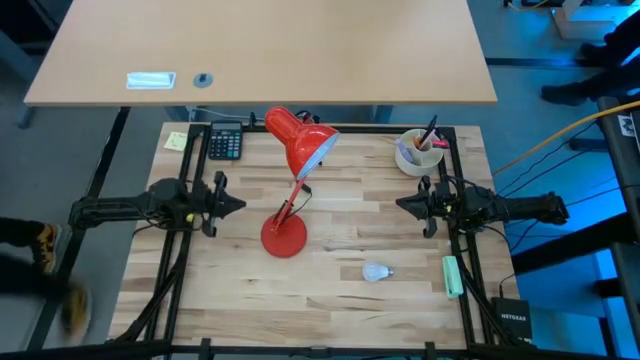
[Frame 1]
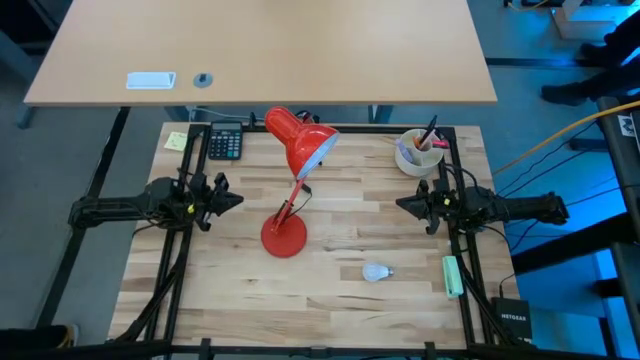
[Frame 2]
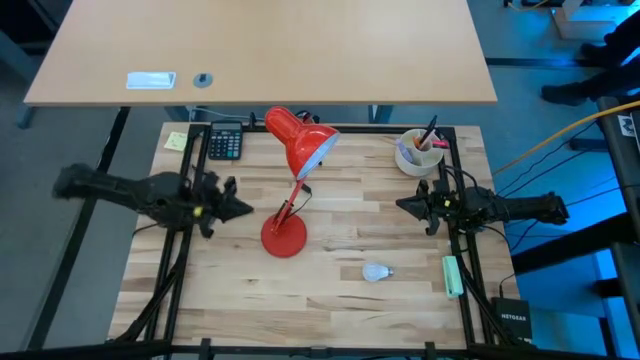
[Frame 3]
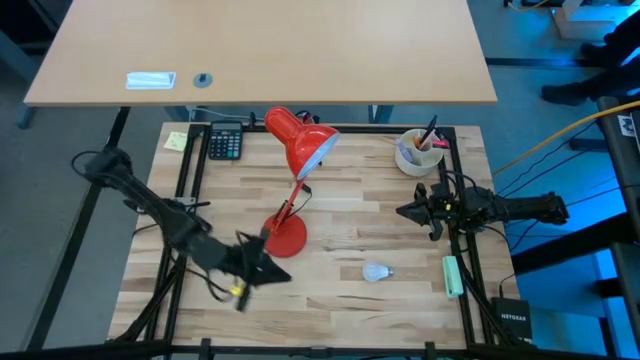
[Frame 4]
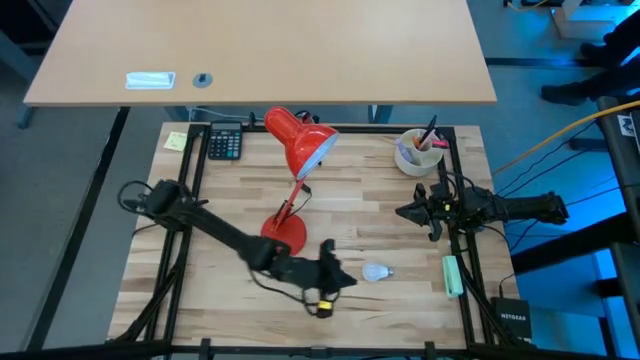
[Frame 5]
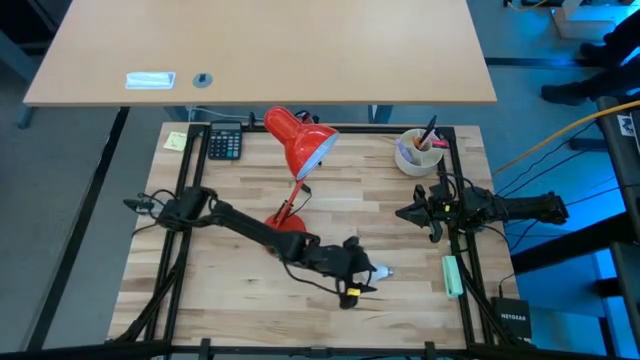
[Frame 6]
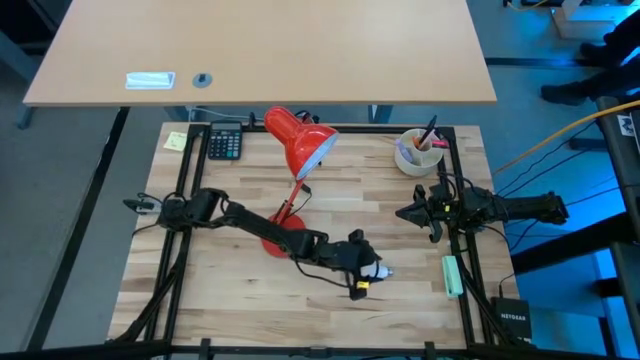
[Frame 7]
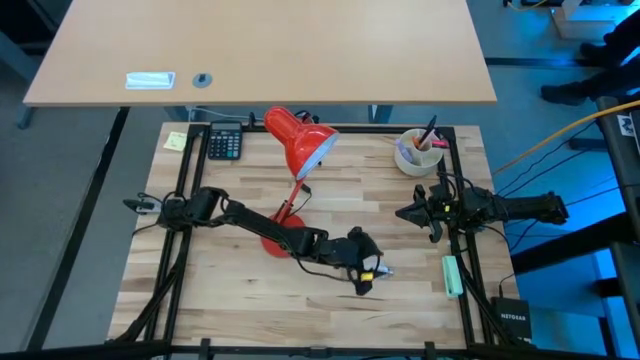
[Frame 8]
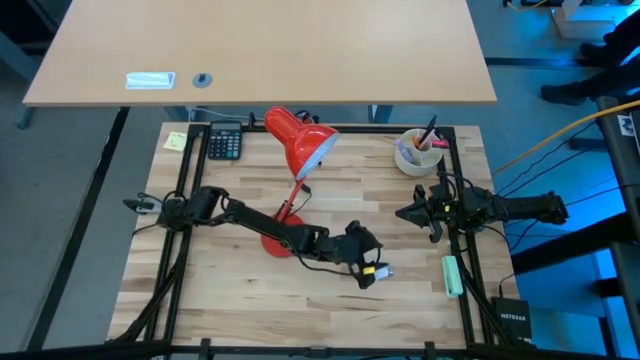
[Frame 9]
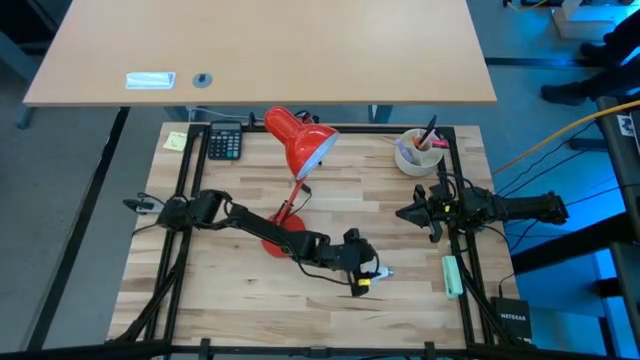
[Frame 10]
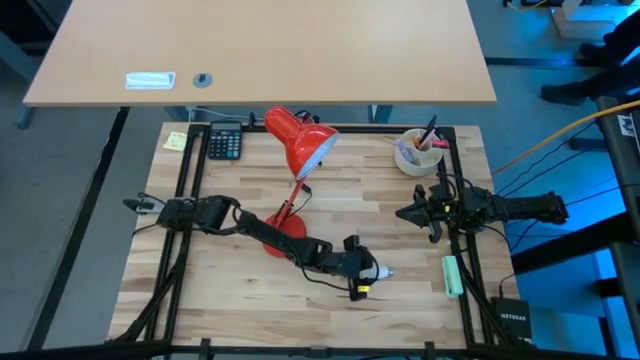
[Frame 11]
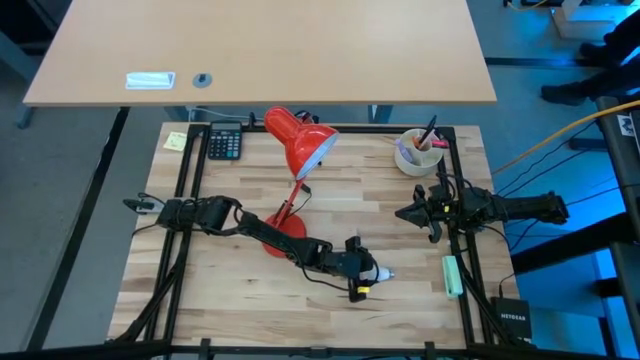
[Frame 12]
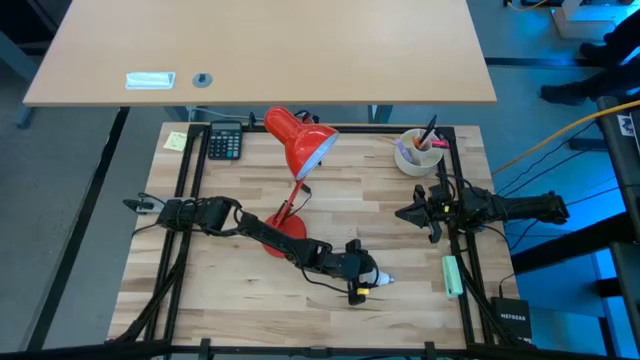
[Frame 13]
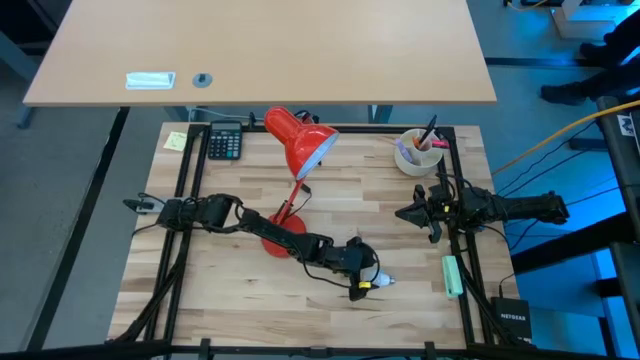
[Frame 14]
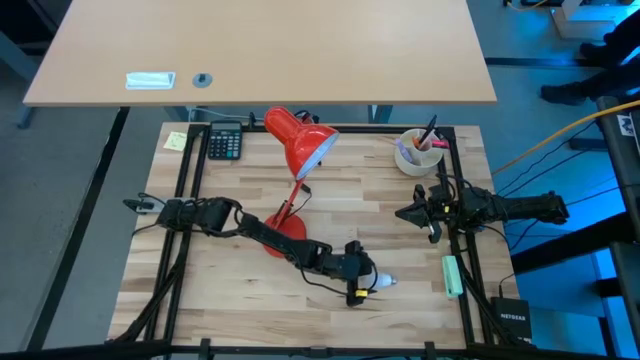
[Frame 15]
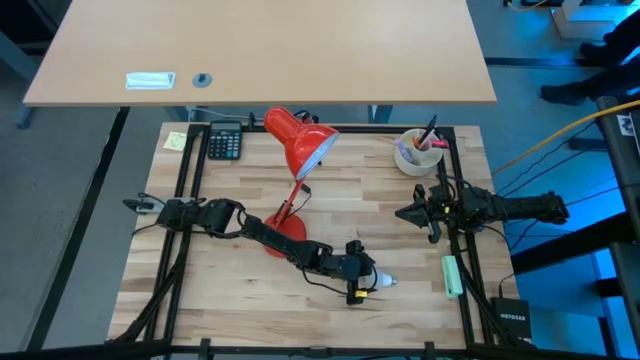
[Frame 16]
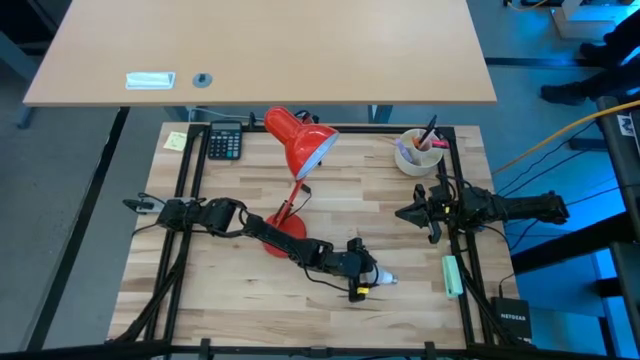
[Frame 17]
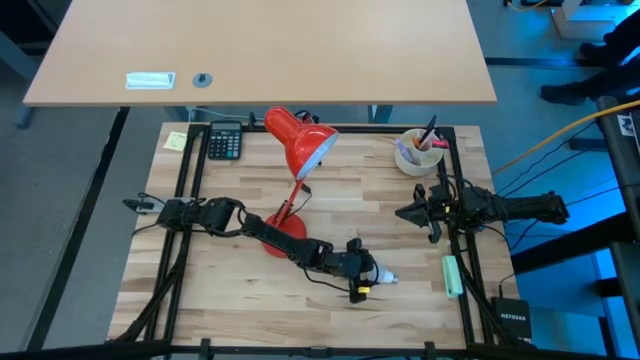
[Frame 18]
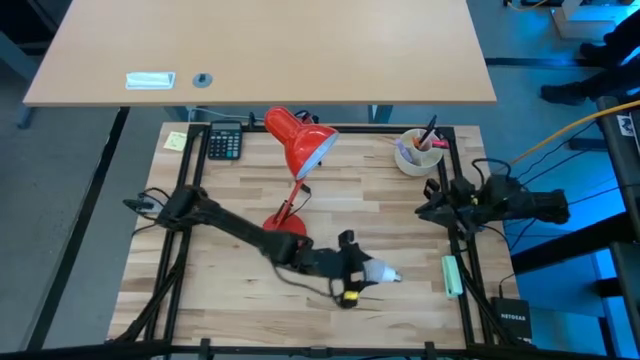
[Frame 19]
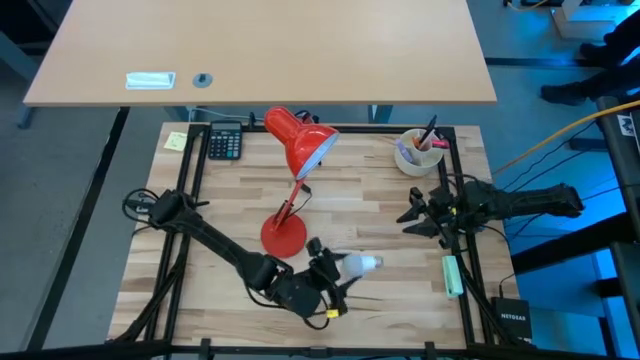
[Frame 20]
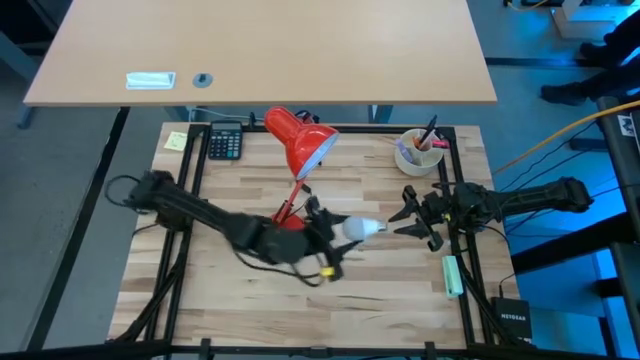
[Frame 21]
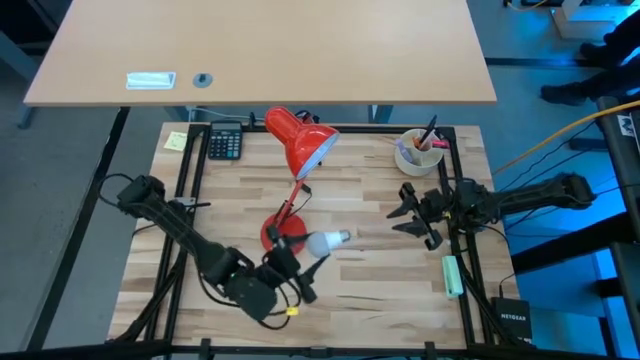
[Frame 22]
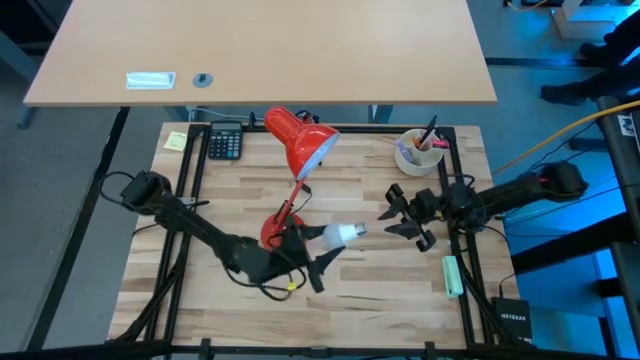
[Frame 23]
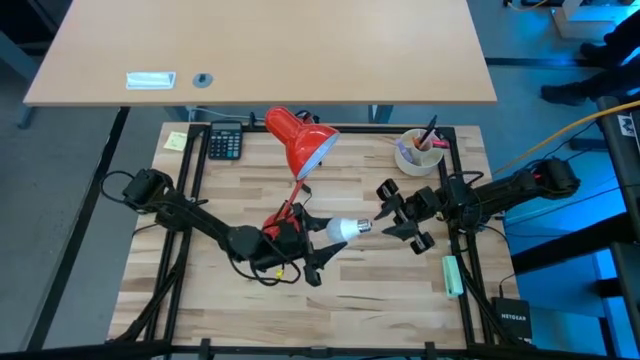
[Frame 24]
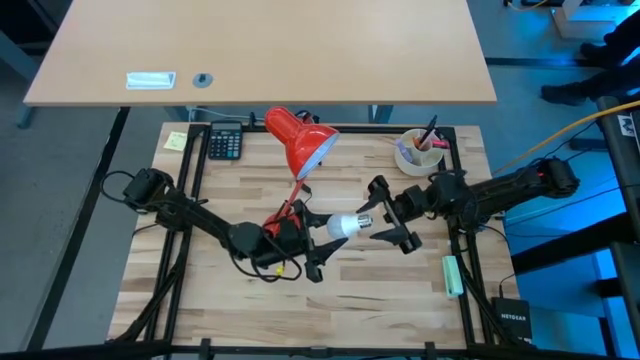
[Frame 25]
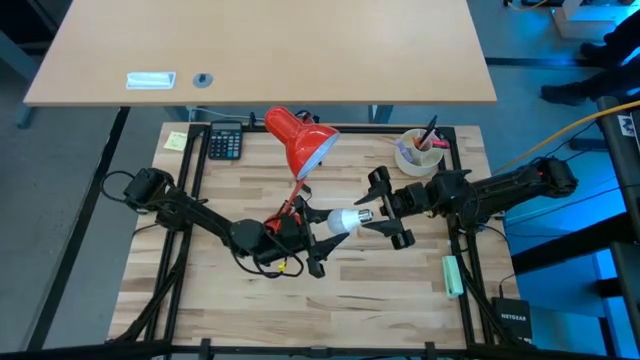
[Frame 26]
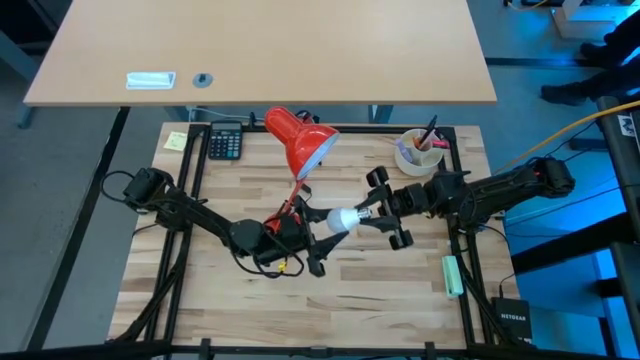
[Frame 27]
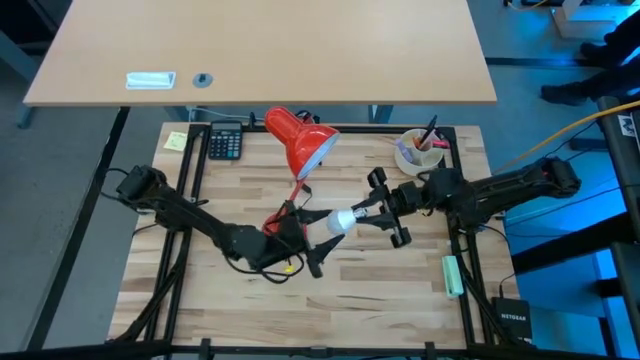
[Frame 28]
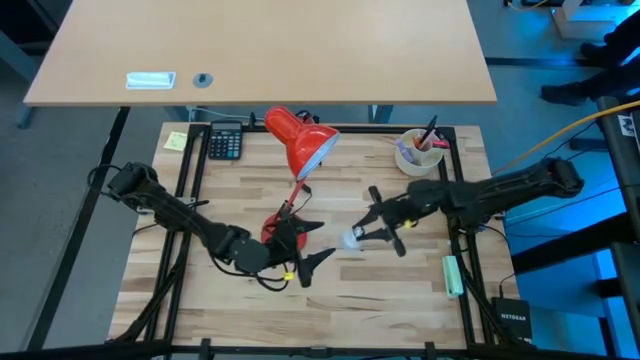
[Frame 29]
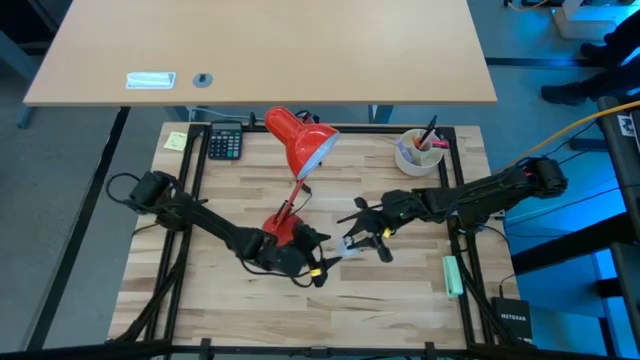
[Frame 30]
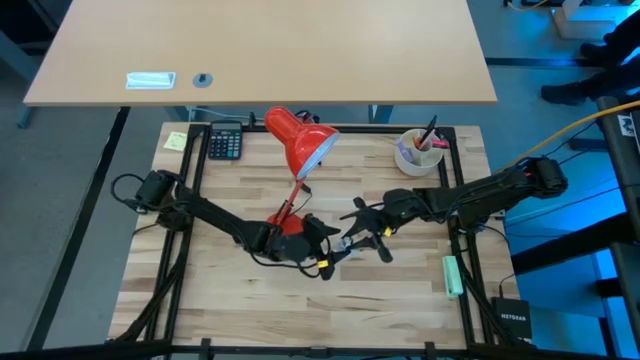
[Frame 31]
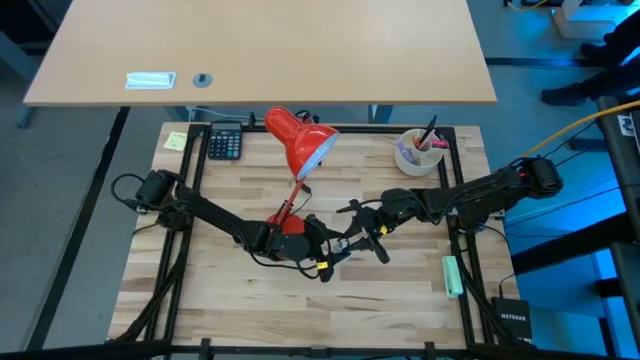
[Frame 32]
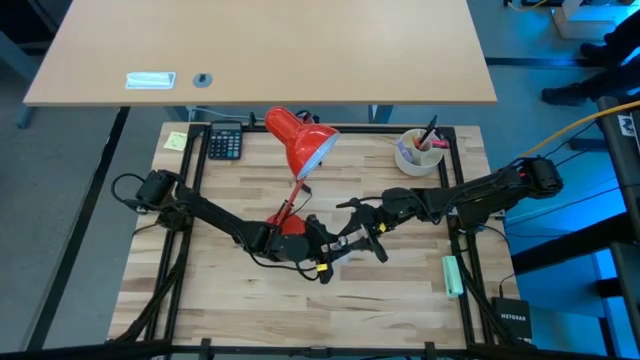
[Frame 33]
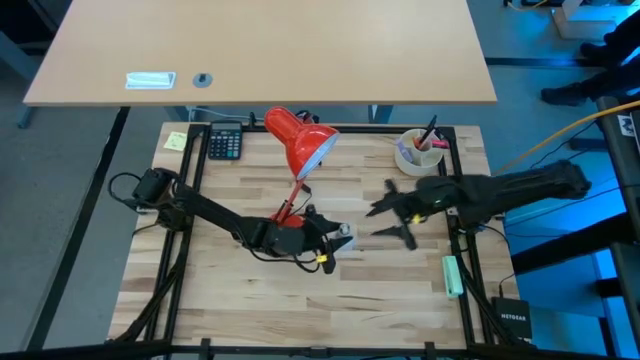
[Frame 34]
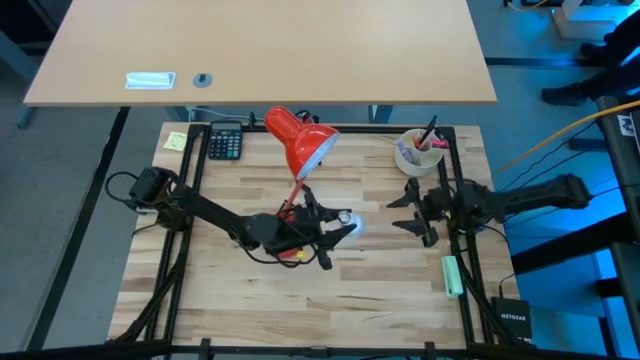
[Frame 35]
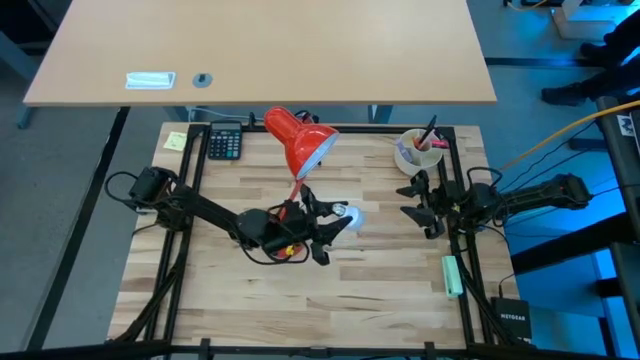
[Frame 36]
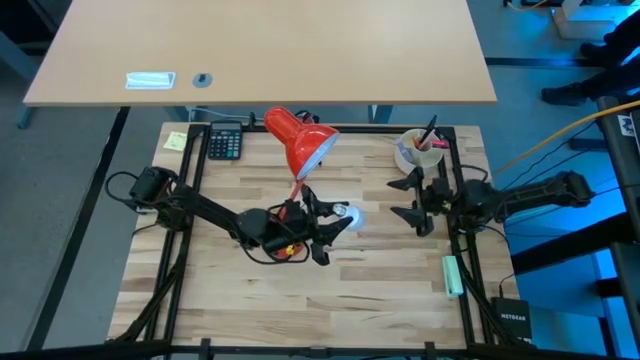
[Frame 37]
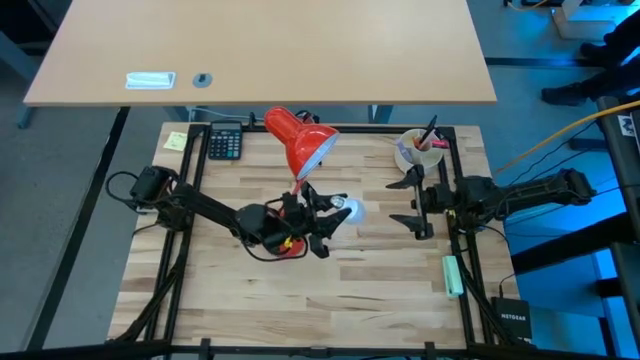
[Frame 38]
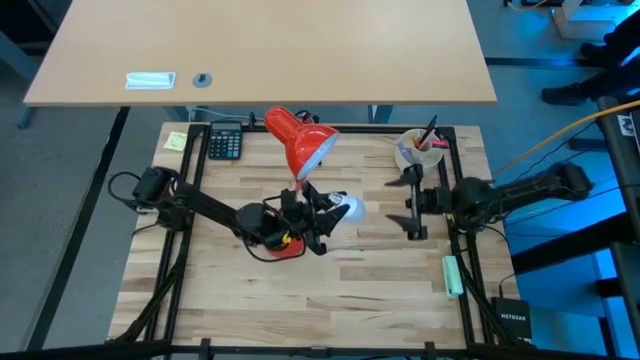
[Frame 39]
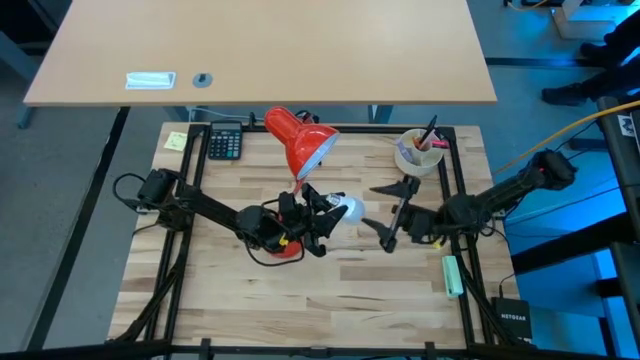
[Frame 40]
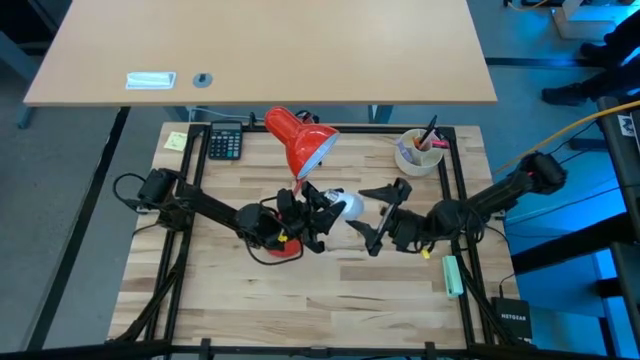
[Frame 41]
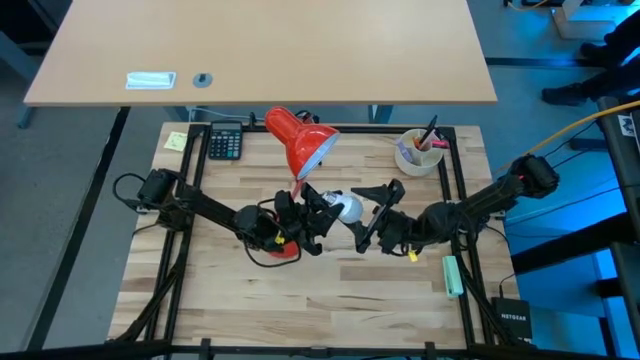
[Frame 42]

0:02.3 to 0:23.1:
Task: Screw lightbulb
Insert the light bulb into the lamp
